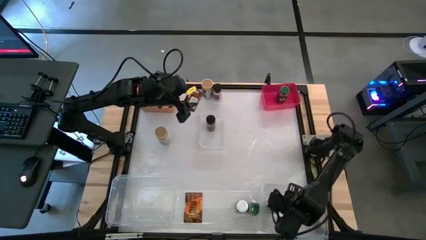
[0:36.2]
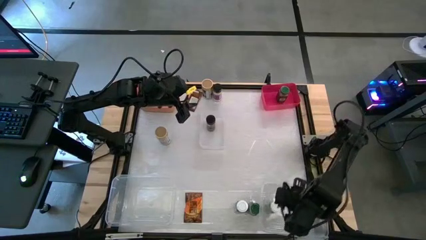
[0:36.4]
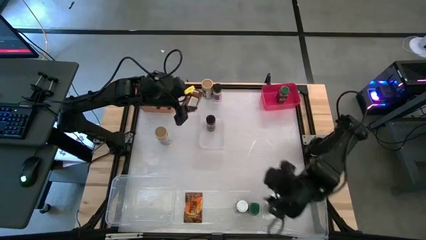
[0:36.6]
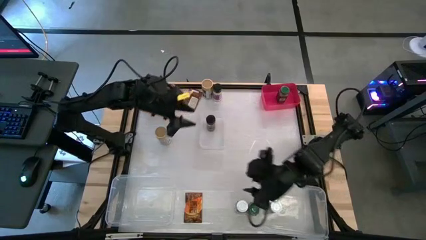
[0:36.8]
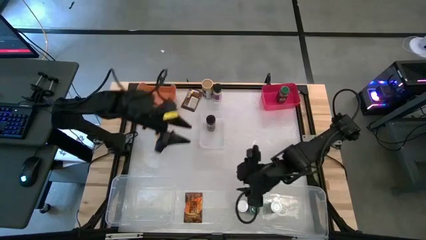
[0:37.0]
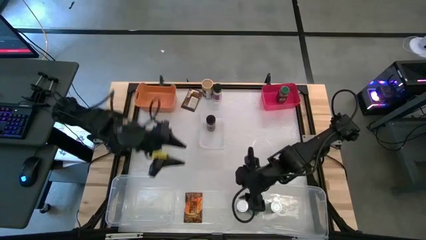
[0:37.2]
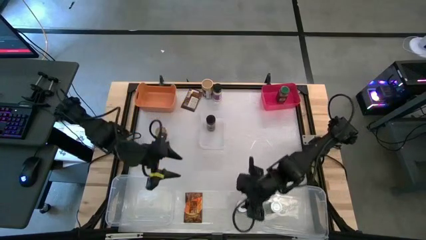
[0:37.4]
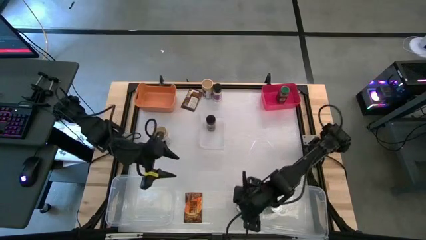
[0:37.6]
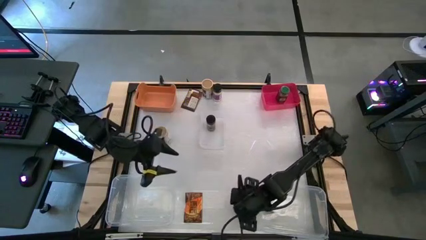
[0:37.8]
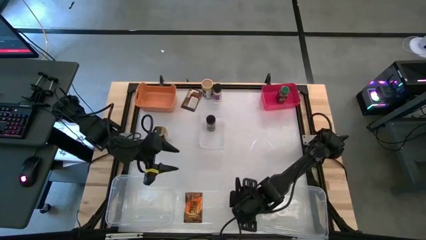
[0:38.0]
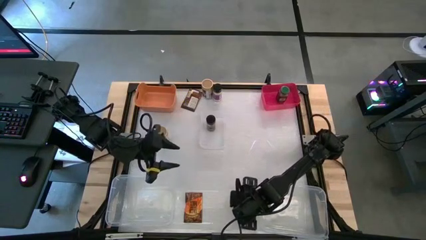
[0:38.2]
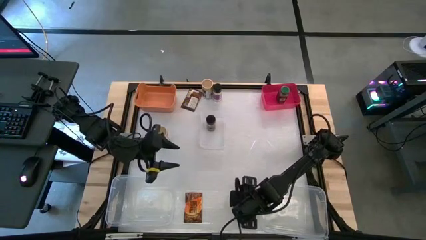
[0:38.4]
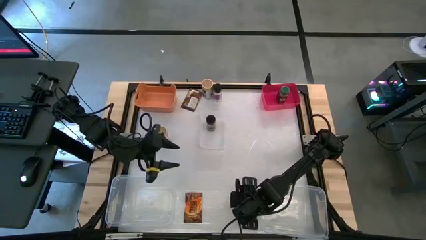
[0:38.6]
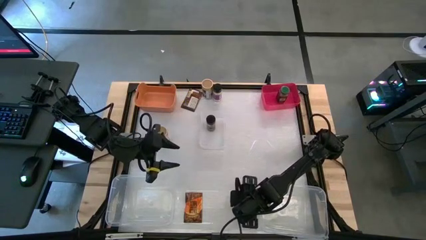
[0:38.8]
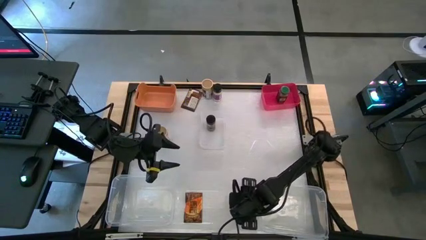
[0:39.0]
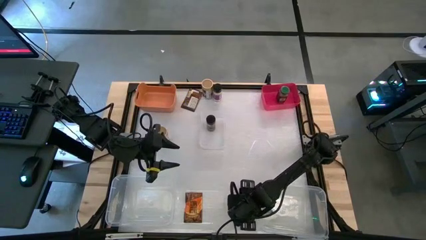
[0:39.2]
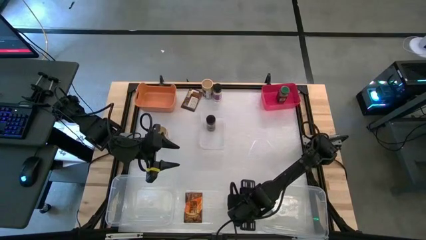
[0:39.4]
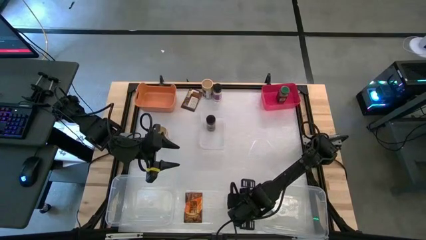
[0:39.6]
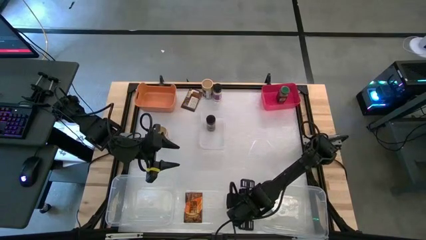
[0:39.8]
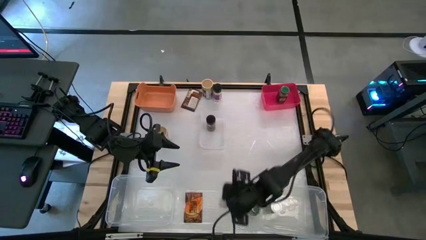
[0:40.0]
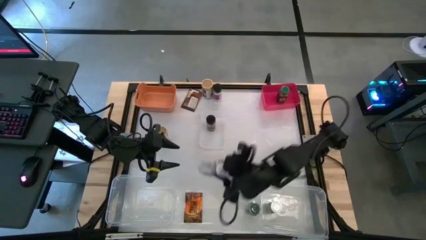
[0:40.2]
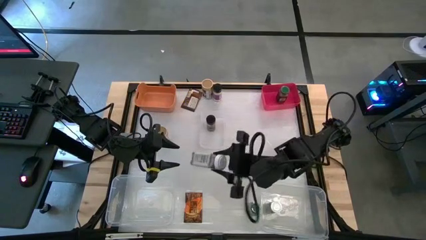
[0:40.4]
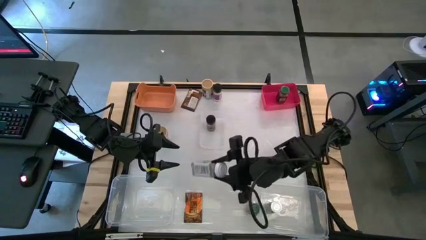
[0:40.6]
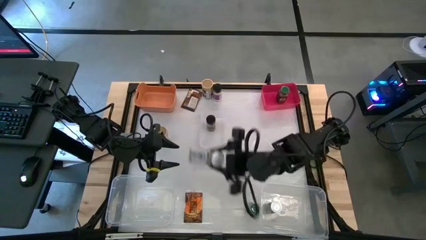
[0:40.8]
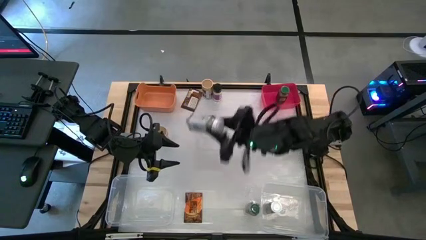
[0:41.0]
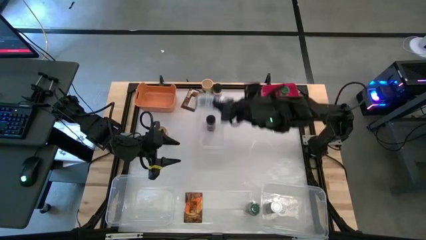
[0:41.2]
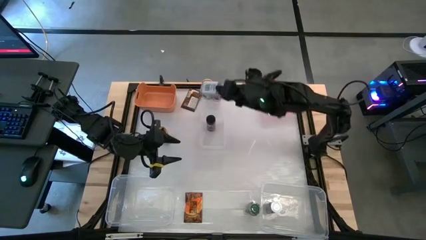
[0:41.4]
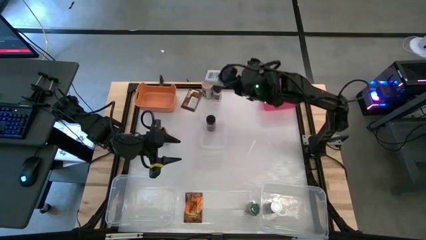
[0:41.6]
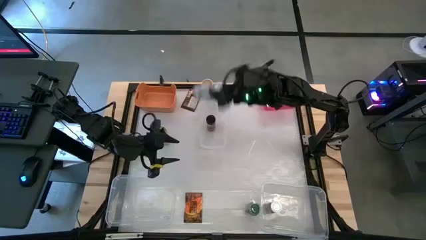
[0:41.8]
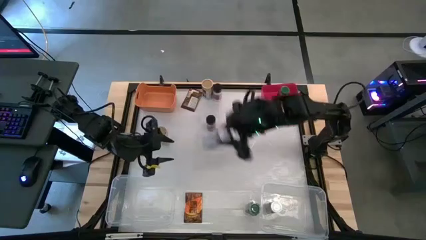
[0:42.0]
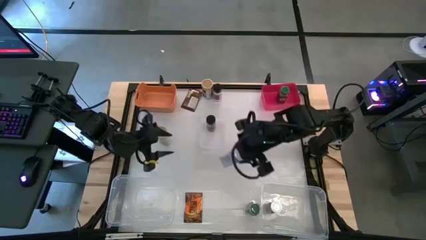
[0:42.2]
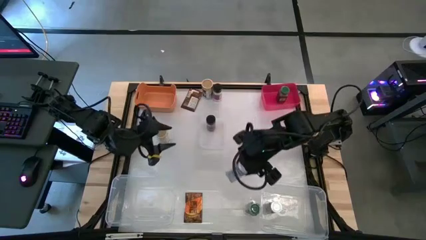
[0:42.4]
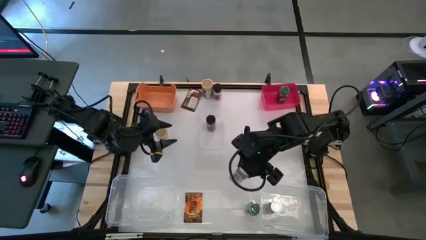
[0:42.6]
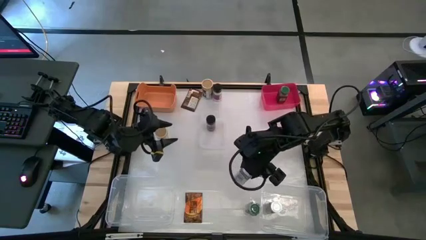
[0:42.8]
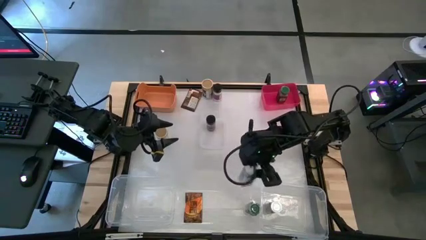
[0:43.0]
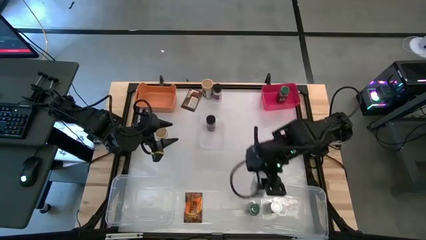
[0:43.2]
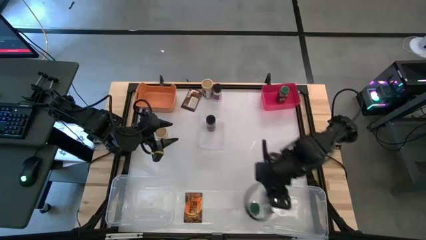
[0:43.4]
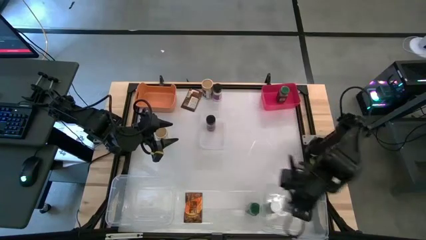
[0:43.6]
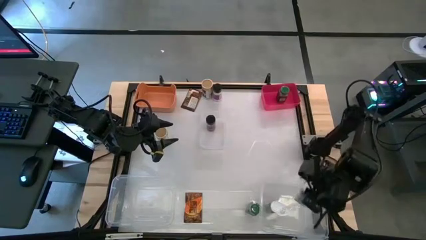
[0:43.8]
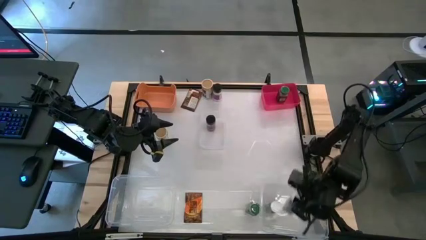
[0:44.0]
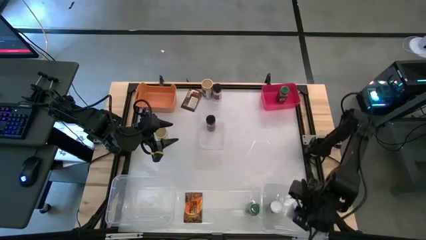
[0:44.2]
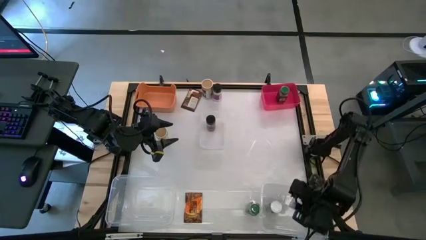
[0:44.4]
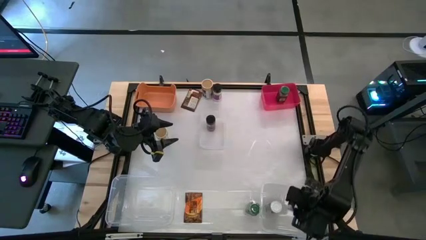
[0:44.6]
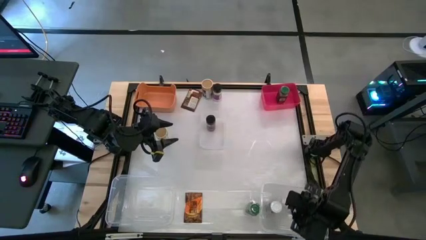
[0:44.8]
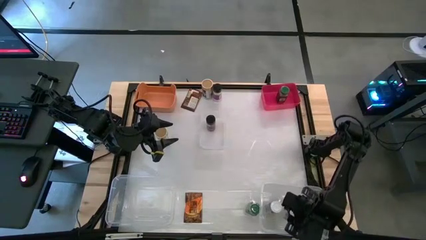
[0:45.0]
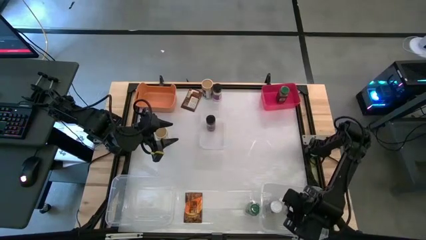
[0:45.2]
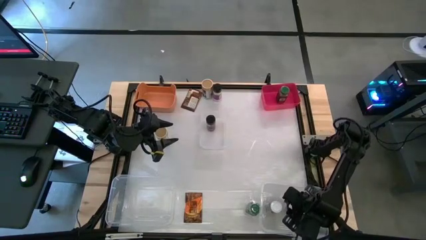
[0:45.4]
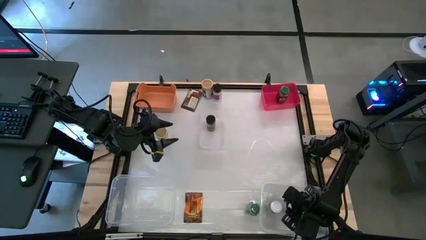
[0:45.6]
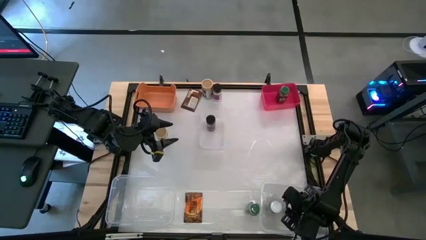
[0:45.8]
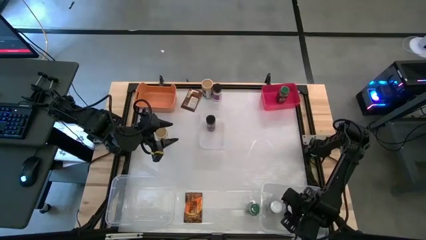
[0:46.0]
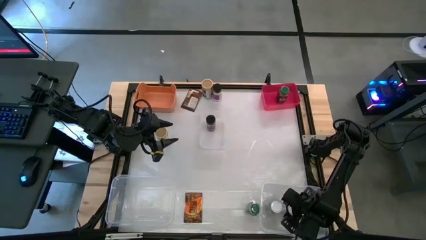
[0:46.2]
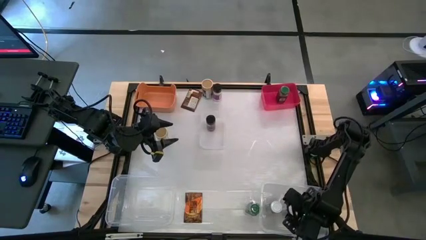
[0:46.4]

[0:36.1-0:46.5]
Task: Sort spices by type
Put the white seasoning bottle into the right transparent bin

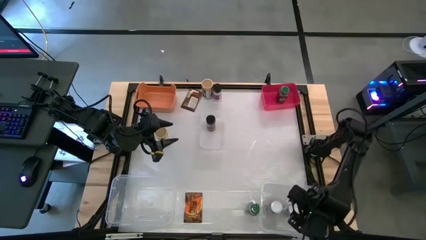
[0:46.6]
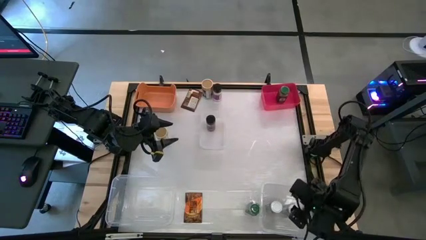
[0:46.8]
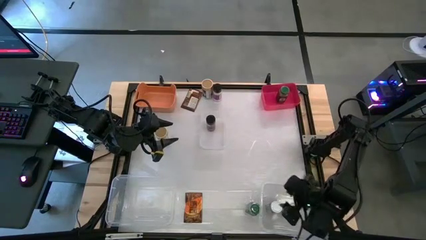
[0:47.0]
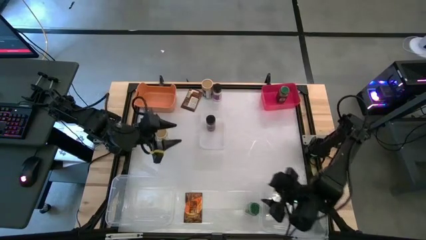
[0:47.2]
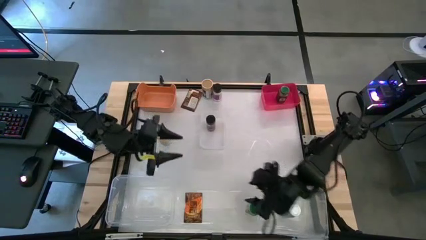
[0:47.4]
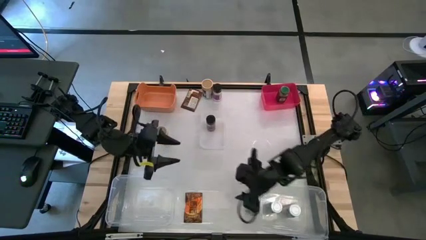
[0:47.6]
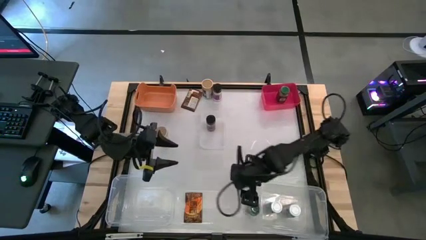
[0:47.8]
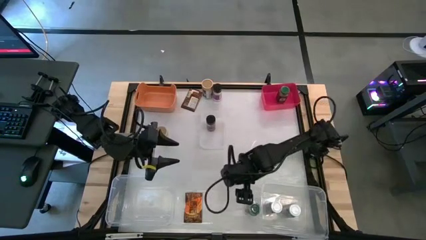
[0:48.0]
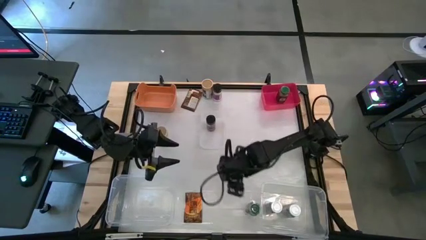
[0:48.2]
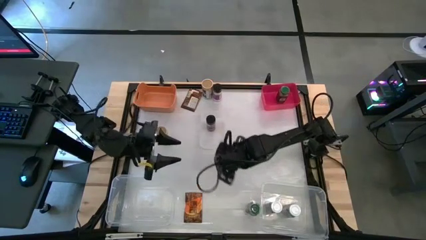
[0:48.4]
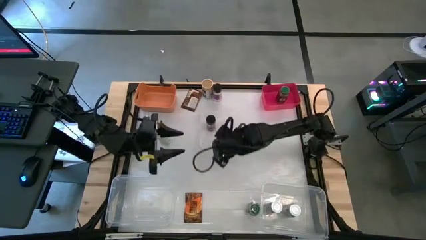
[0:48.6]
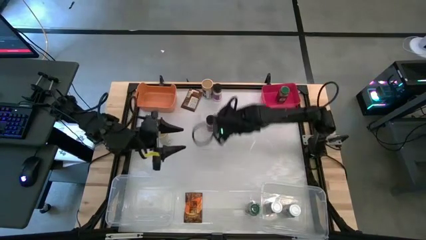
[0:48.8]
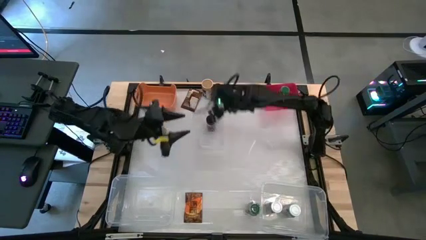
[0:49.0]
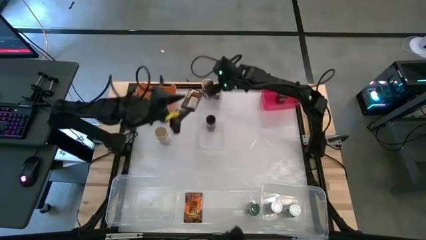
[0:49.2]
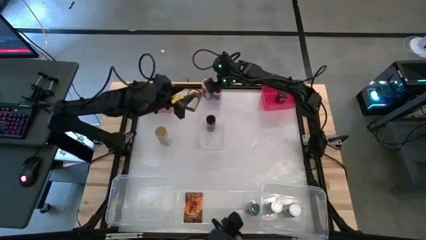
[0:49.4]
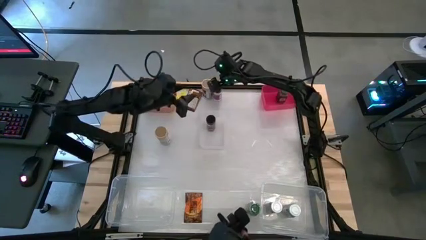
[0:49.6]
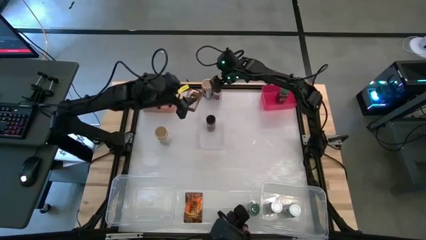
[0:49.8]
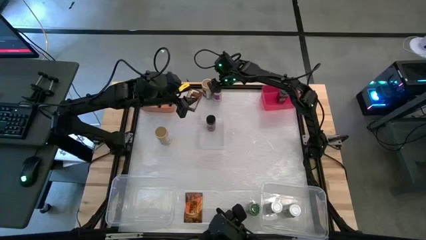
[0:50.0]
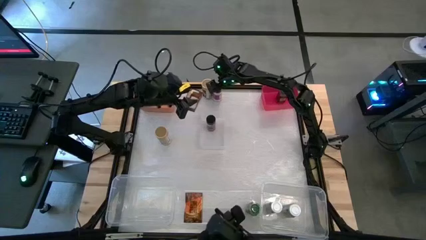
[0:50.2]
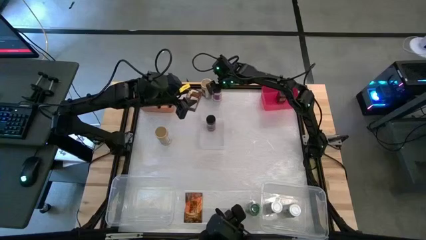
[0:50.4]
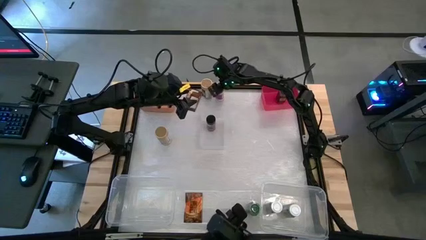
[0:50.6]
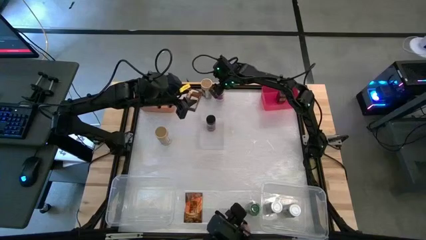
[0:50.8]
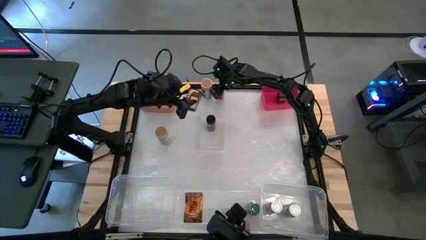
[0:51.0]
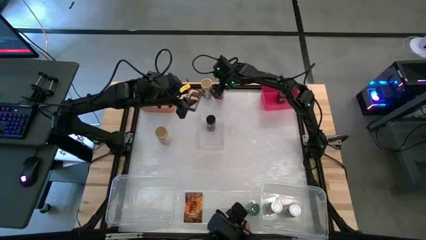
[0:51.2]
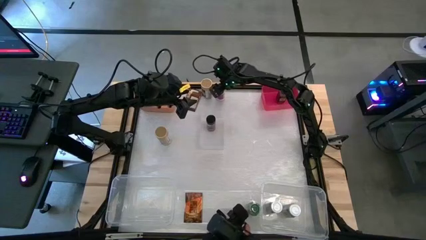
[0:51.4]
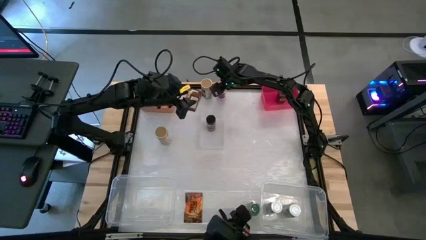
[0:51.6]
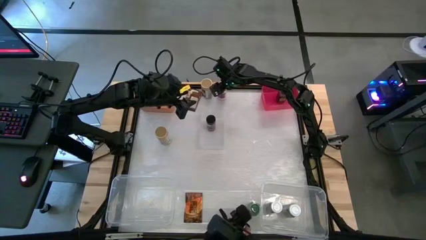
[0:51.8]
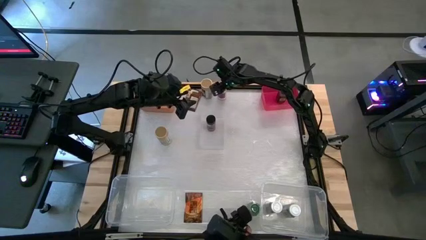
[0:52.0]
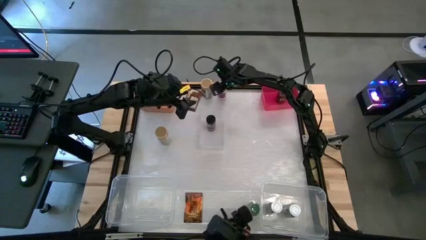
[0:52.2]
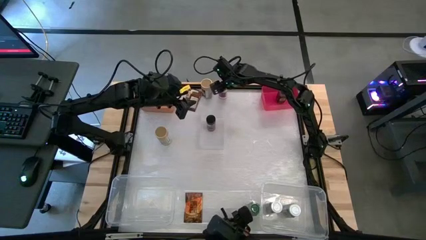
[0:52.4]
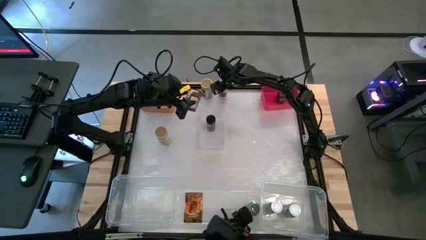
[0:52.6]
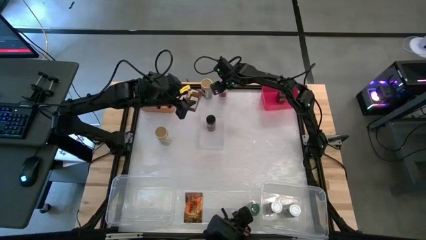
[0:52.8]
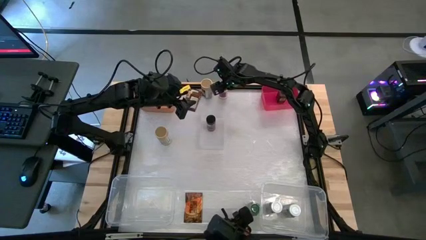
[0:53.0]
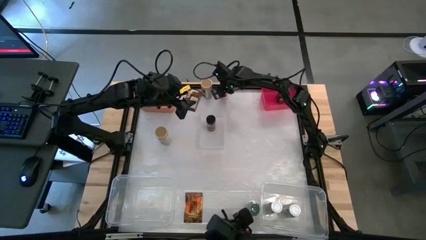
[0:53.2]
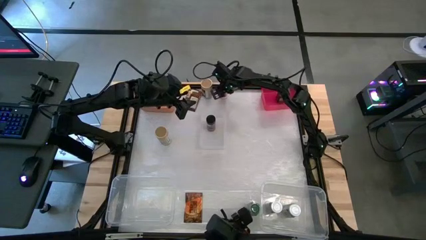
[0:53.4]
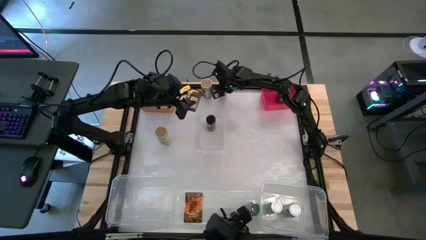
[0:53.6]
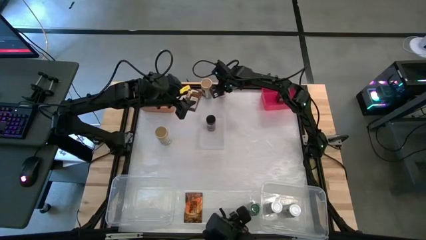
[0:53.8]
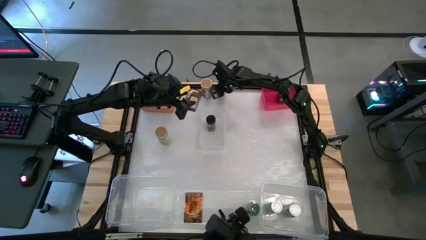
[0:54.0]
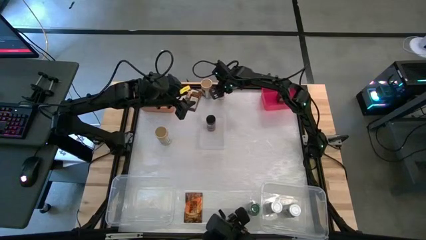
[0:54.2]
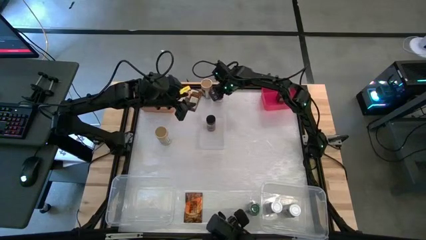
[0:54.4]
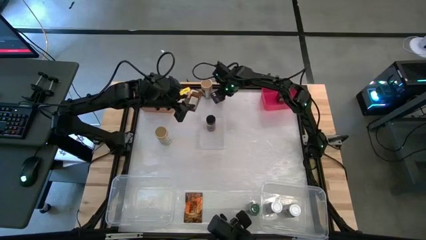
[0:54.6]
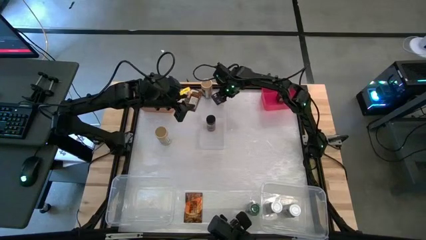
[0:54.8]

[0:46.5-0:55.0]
Put the black seasoning bottle into the white bin
